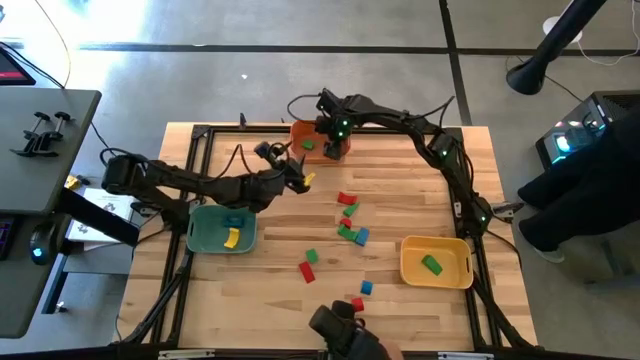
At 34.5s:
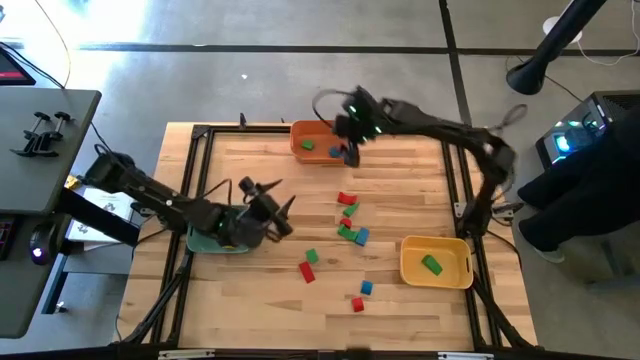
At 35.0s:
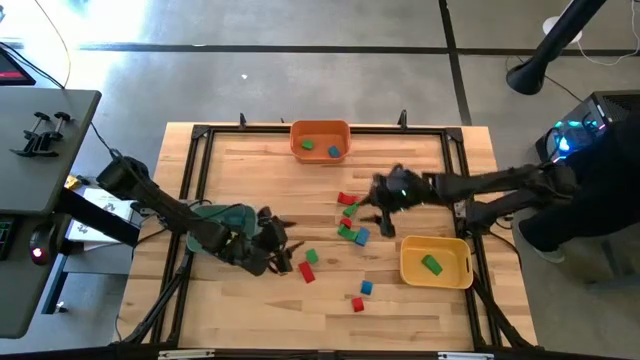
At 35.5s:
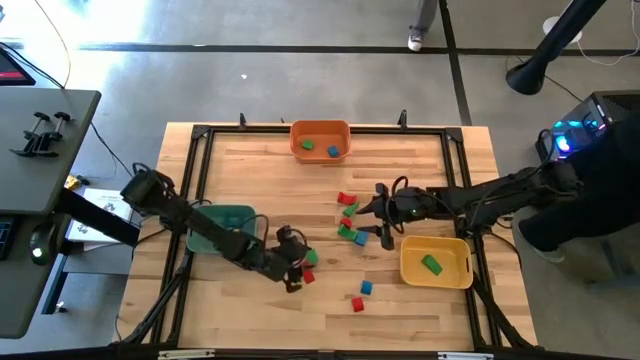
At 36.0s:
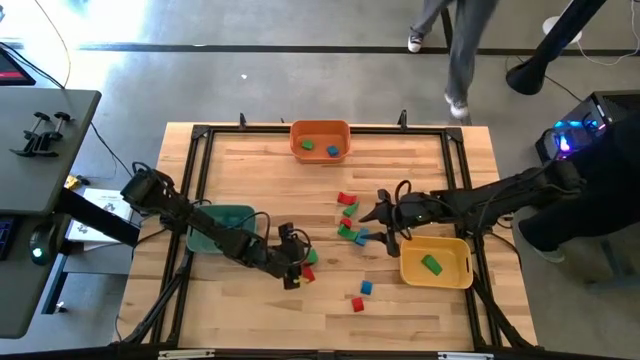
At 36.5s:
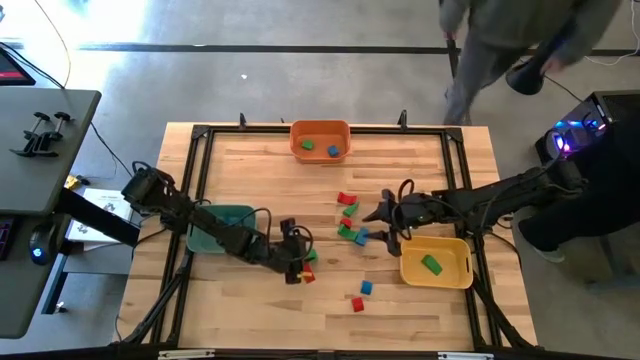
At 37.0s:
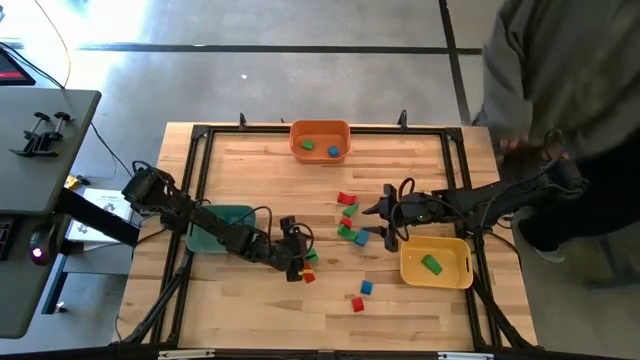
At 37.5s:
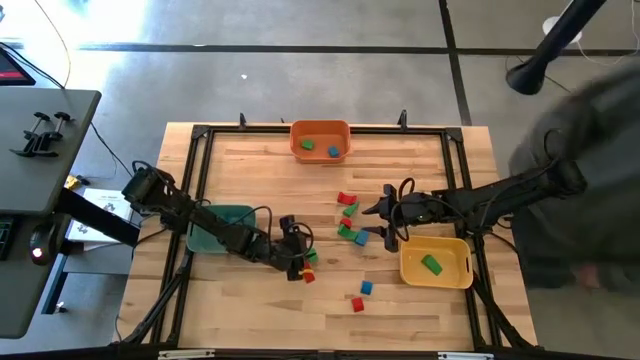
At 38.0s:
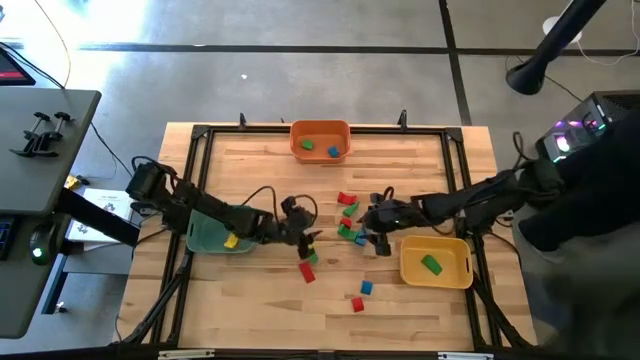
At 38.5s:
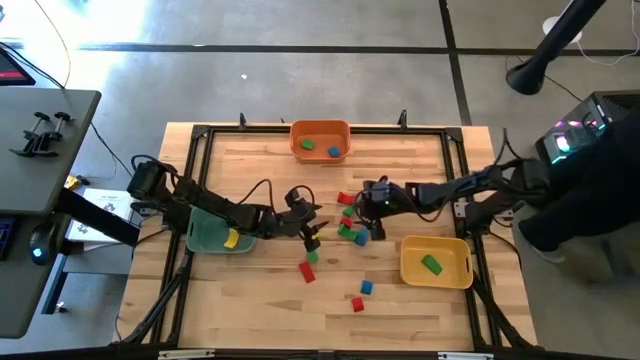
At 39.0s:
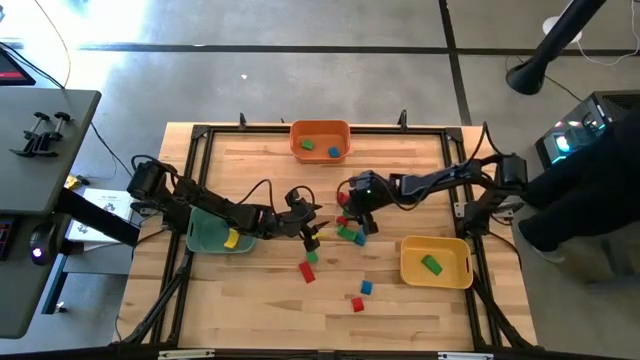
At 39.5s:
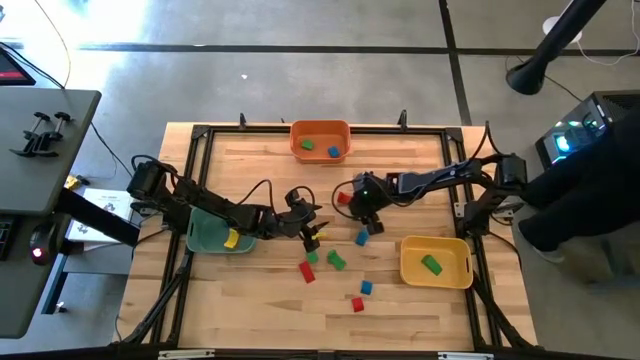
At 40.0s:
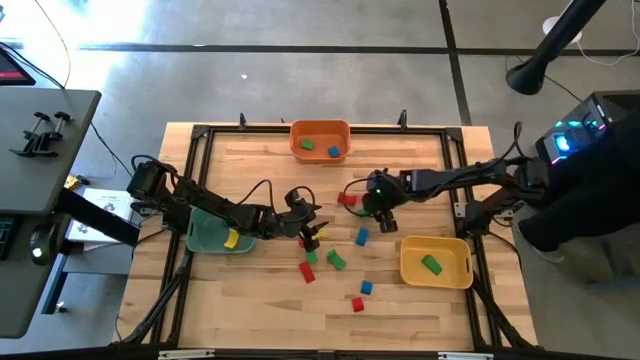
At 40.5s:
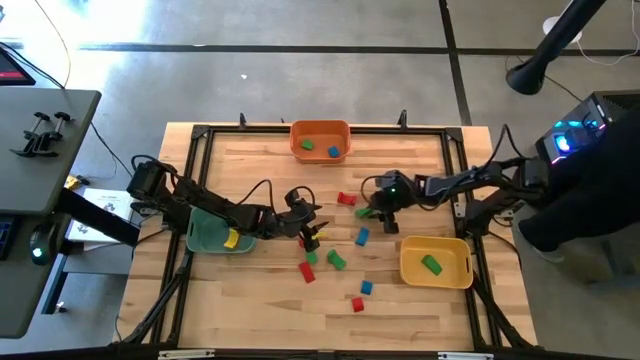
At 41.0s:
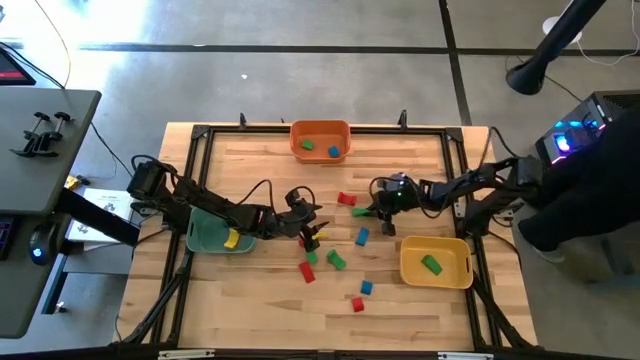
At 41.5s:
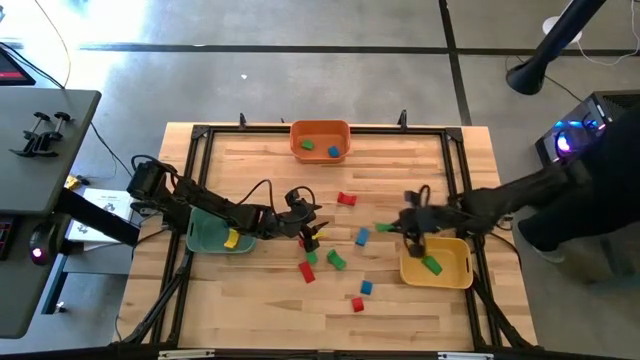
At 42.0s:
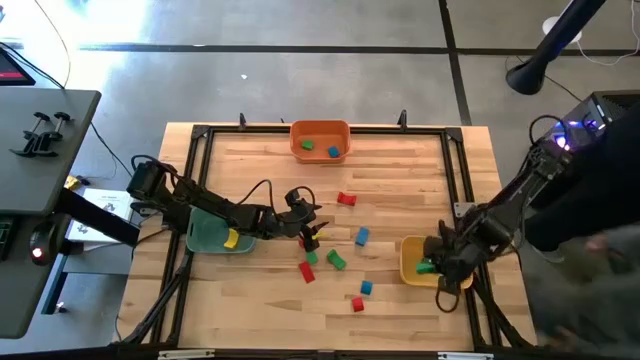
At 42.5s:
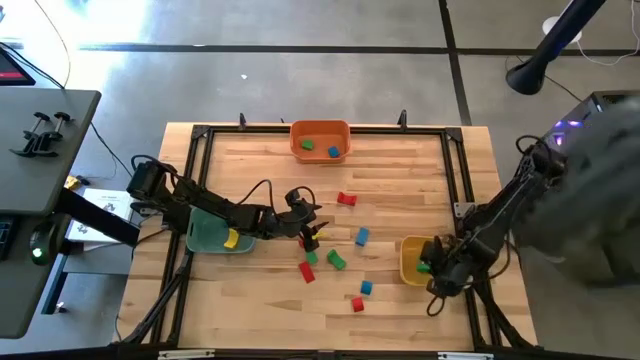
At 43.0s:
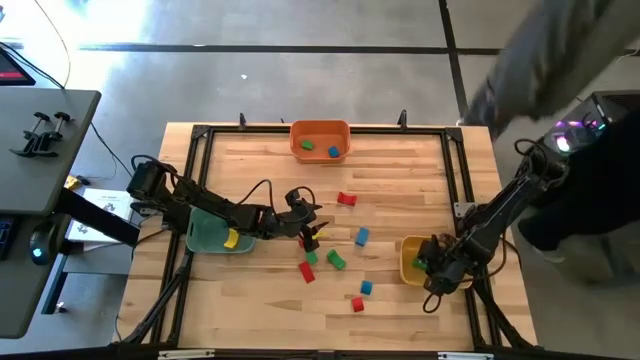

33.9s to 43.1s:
Task: Sort blocks by size
Put the green triangle block into the yellow bin

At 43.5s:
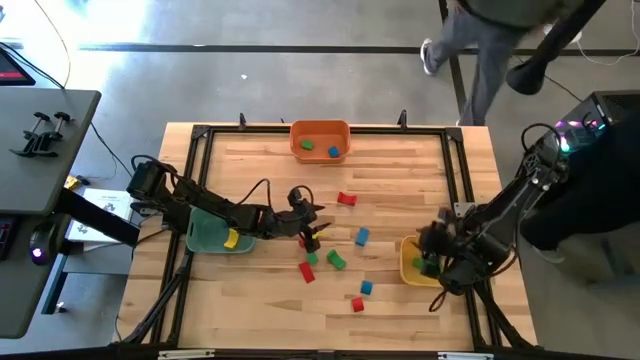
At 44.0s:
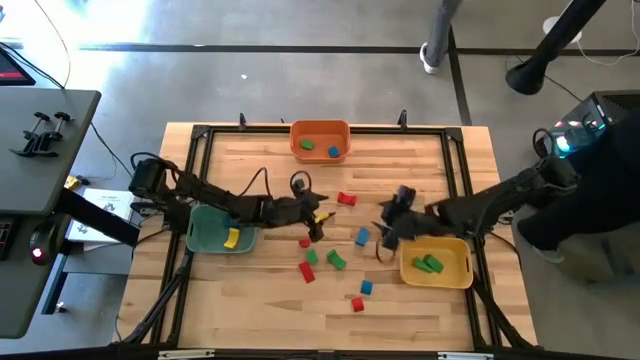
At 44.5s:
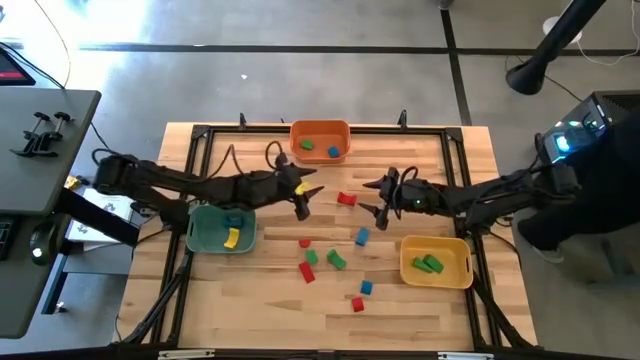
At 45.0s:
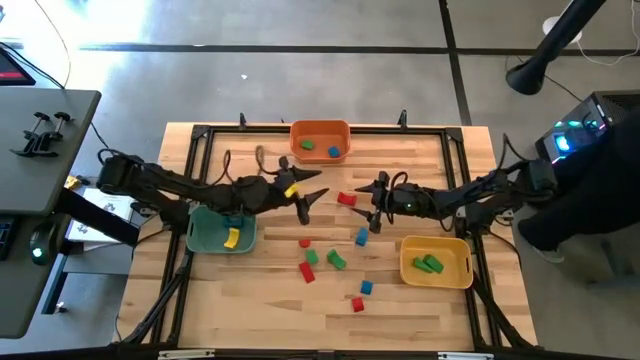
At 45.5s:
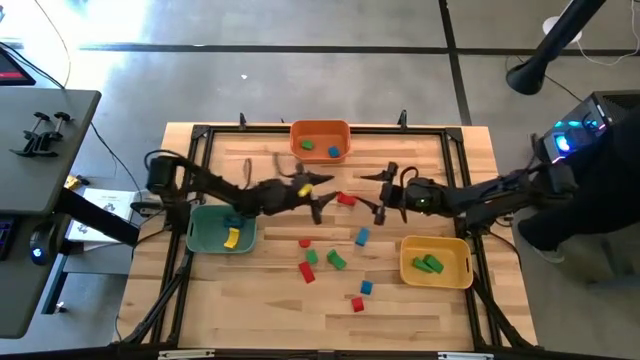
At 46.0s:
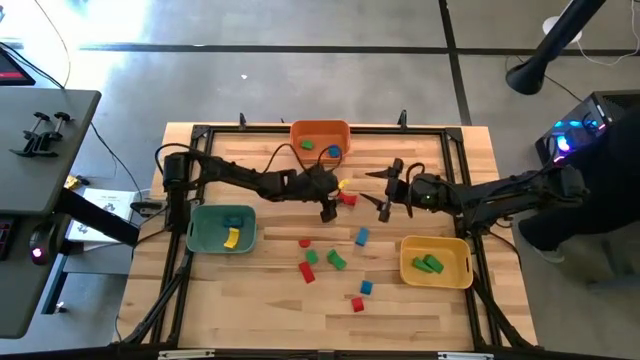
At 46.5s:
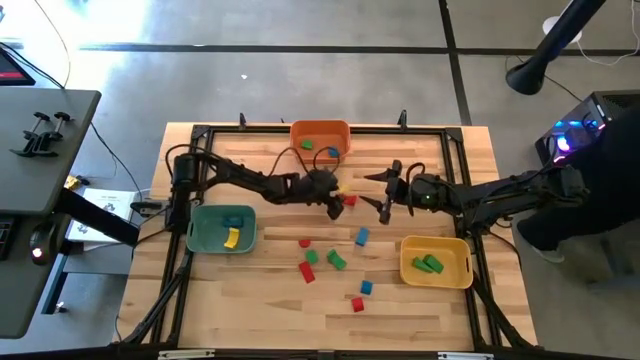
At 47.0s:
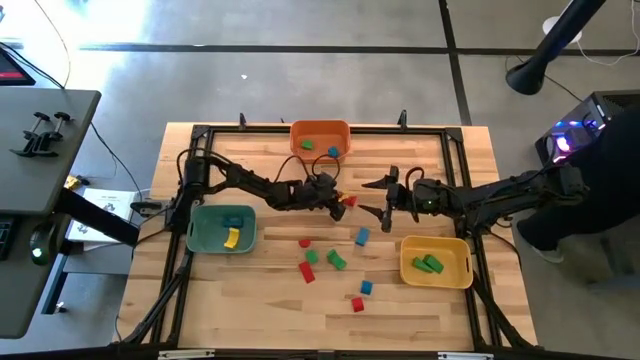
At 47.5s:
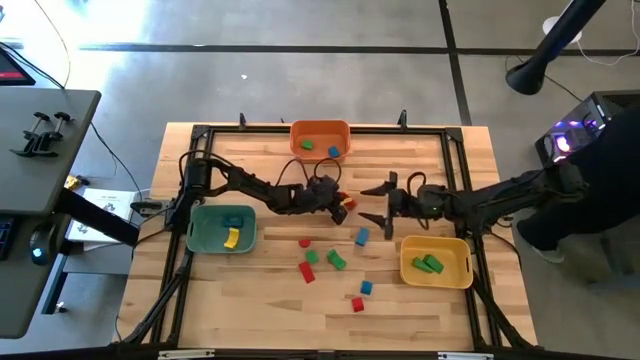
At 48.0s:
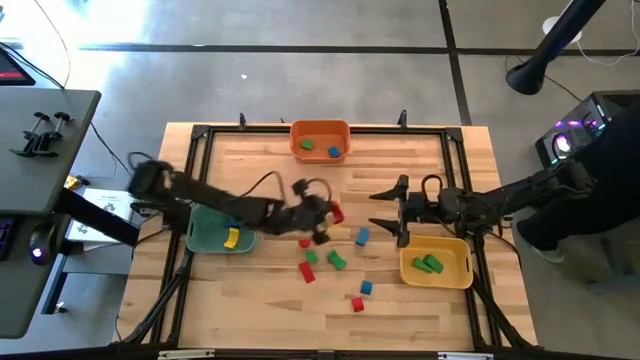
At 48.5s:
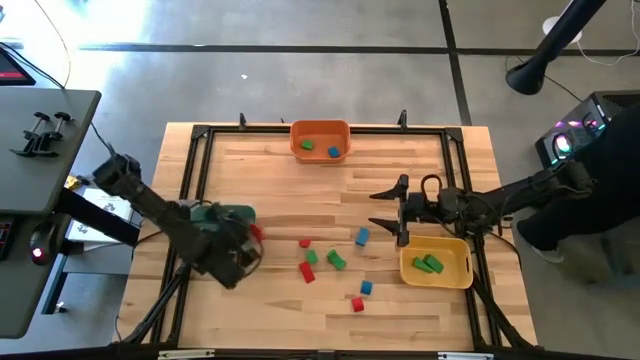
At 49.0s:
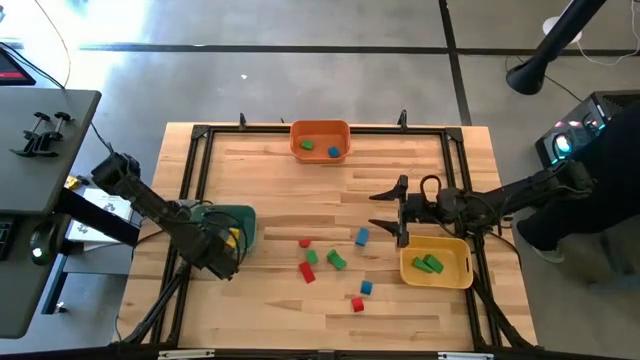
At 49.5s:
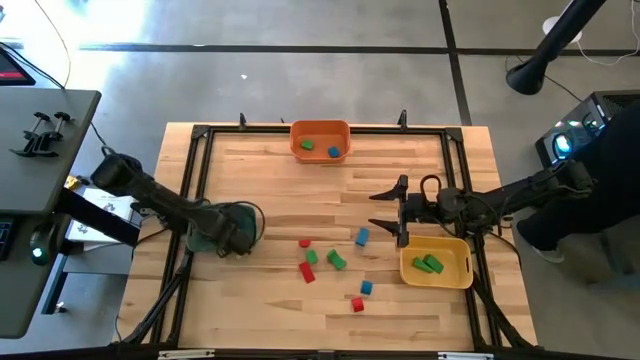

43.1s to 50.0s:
Put the red arch block into the green bin

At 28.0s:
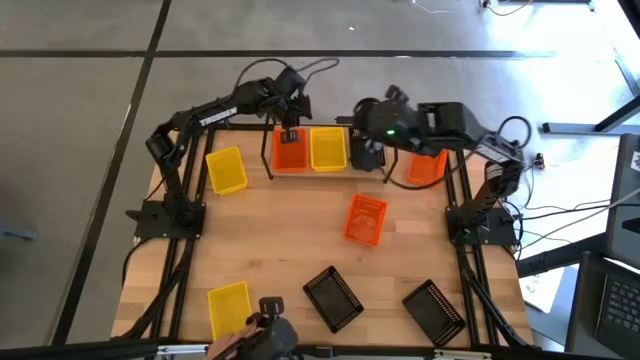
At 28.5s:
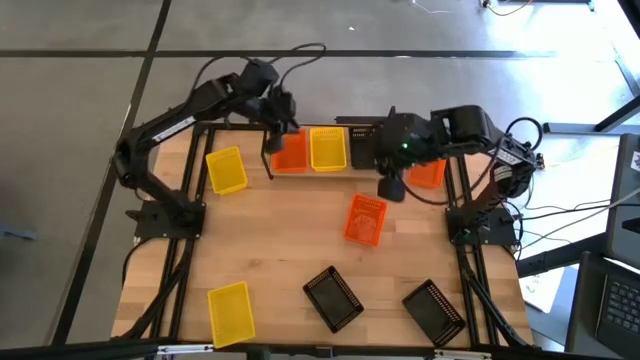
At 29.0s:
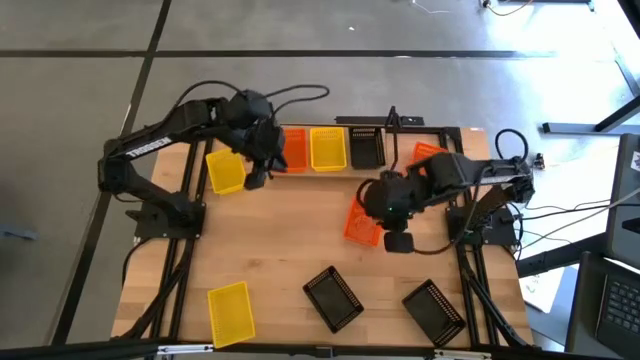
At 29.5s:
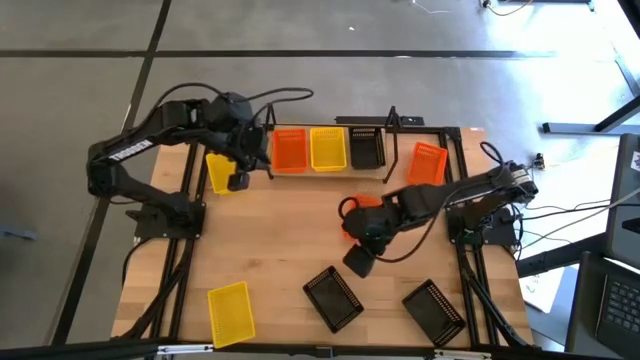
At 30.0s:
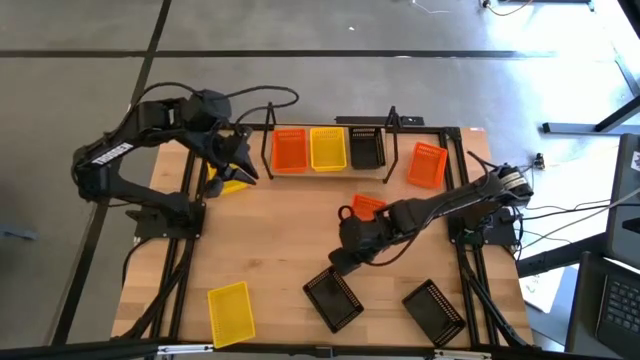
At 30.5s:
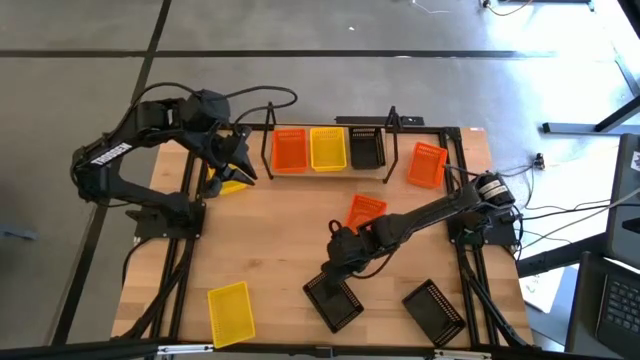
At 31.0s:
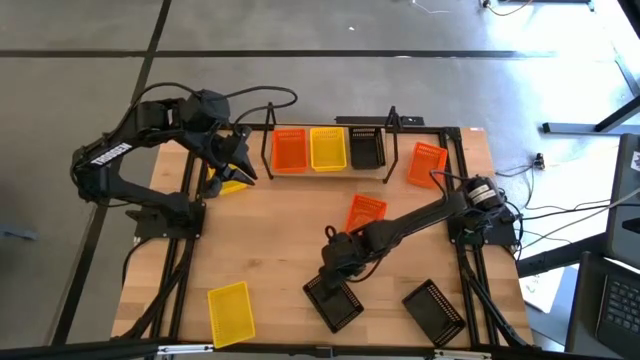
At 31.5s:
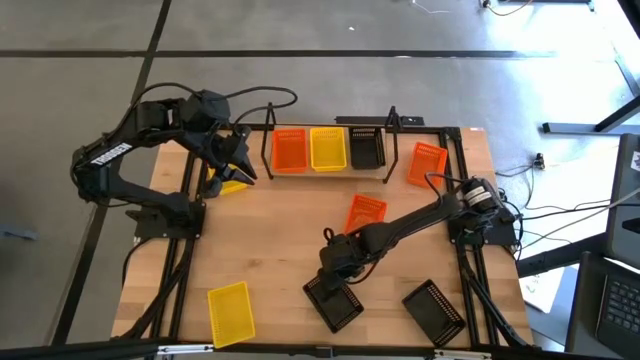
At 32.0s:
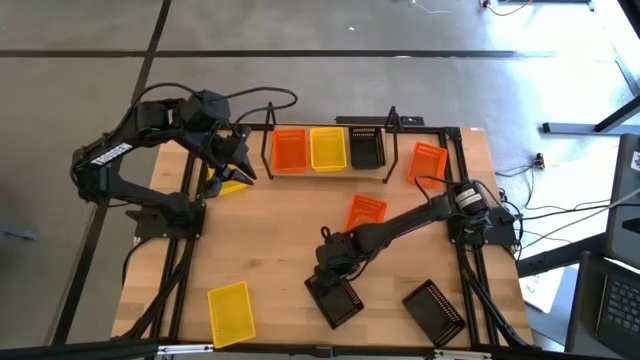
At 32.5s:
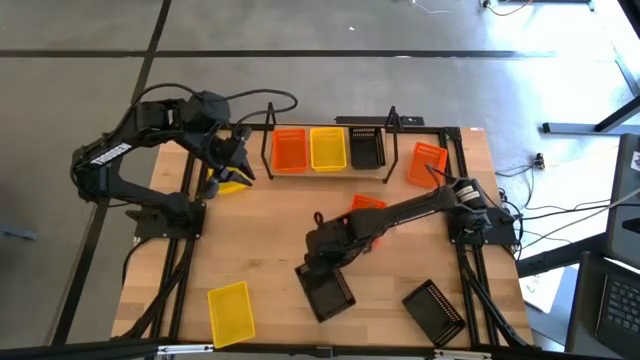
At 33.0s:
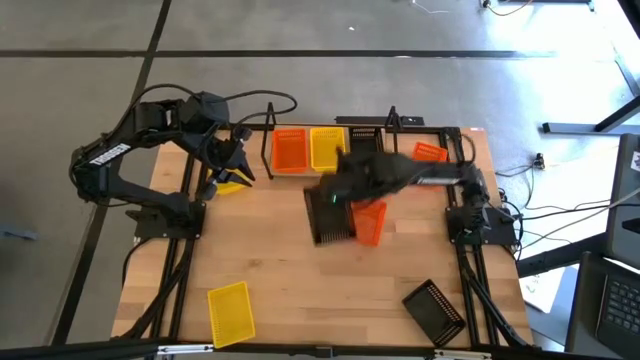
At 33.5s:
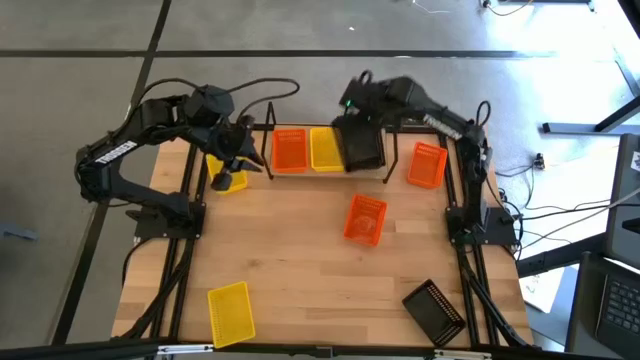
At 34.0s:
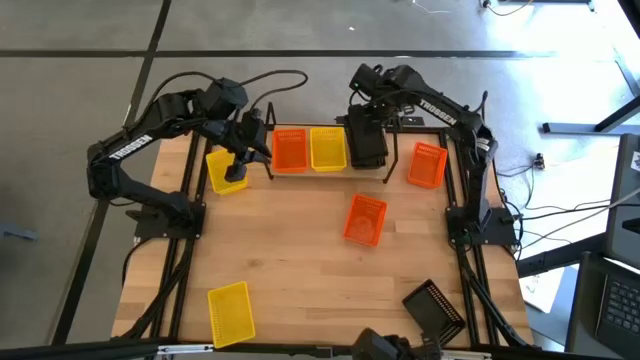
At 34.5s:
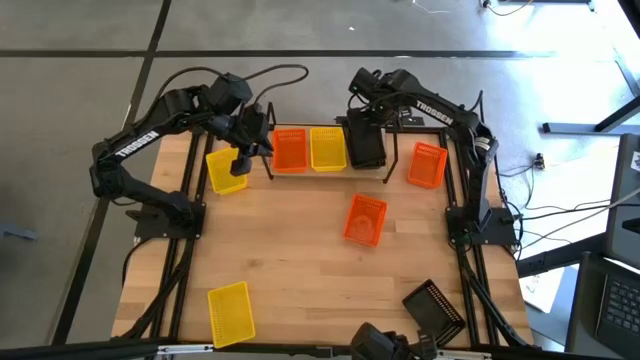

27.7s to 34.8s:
Task: Stack baskets on shelf by color
Stack the left black bin on the black bin on the shelf
